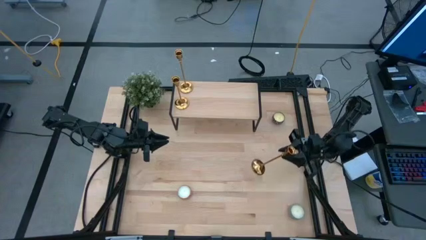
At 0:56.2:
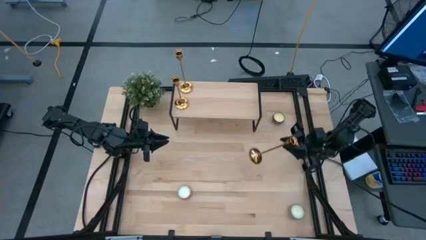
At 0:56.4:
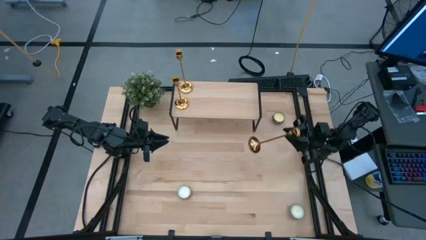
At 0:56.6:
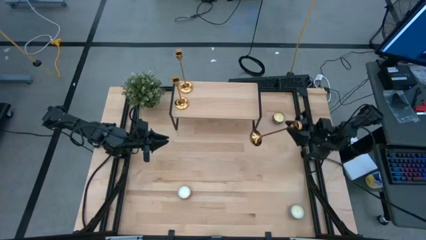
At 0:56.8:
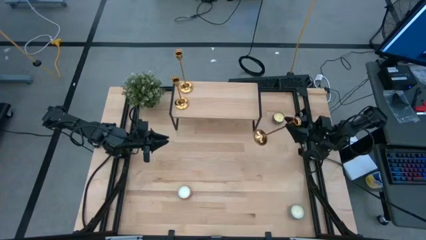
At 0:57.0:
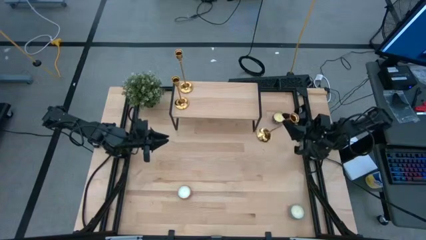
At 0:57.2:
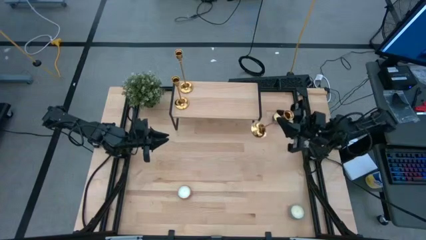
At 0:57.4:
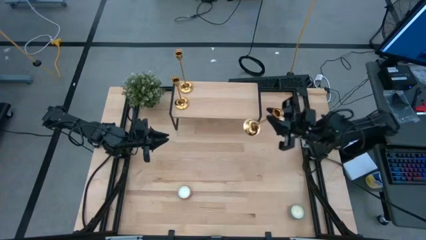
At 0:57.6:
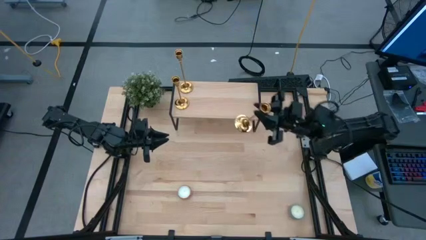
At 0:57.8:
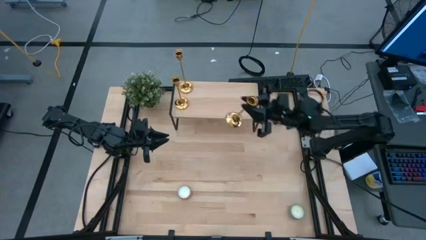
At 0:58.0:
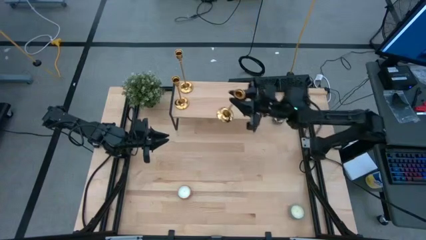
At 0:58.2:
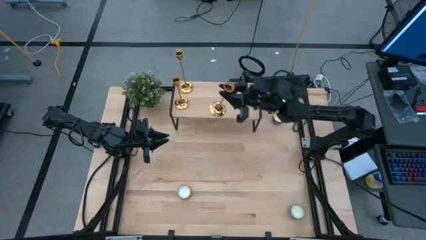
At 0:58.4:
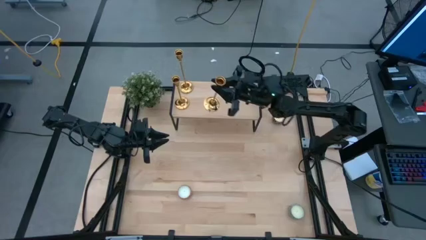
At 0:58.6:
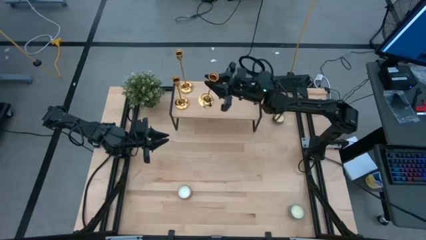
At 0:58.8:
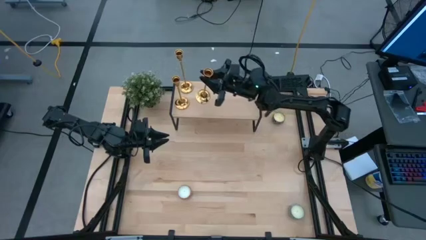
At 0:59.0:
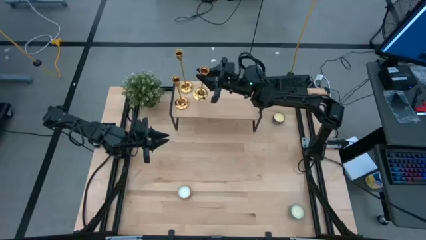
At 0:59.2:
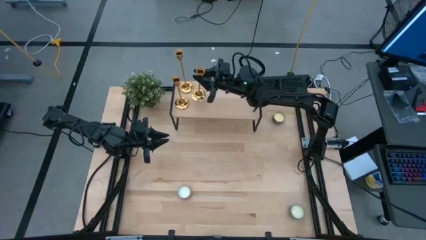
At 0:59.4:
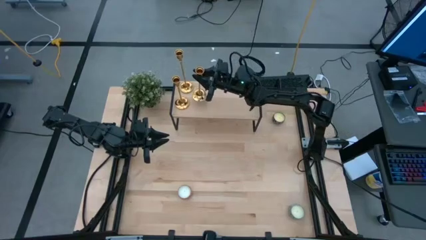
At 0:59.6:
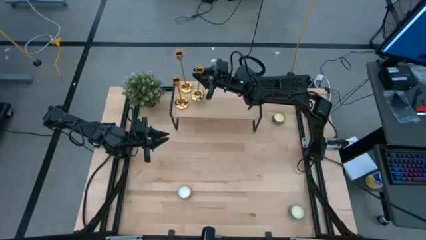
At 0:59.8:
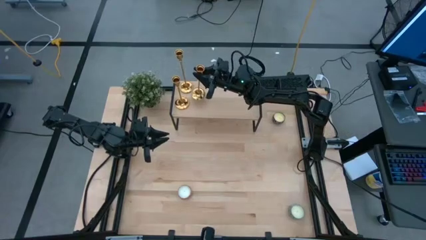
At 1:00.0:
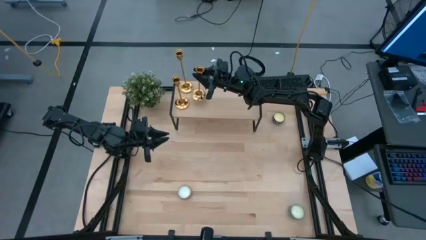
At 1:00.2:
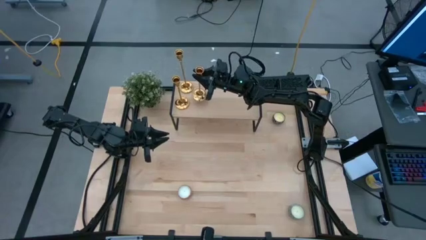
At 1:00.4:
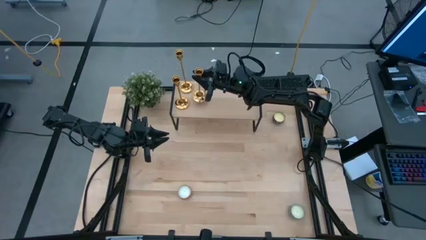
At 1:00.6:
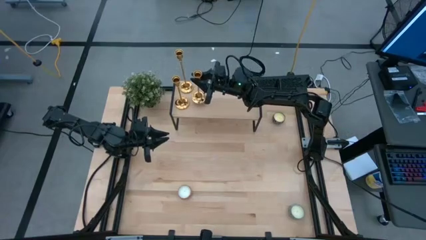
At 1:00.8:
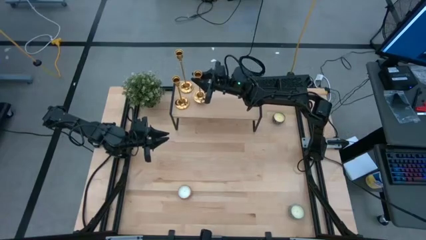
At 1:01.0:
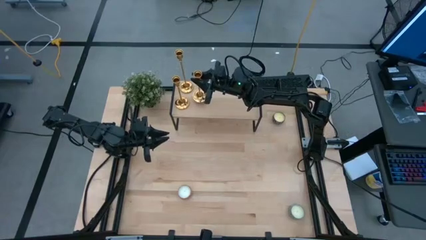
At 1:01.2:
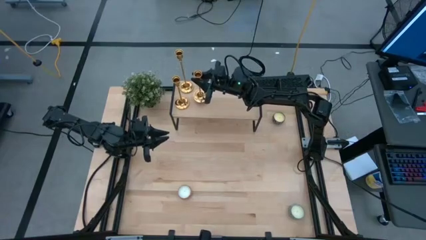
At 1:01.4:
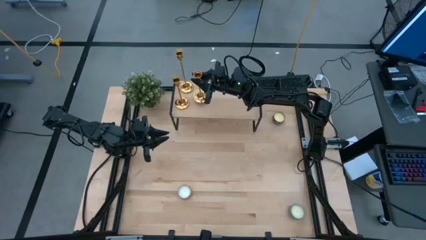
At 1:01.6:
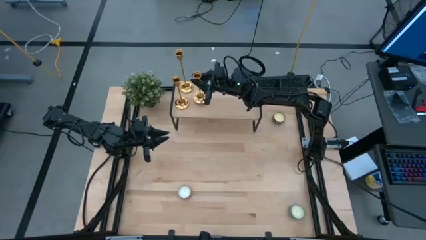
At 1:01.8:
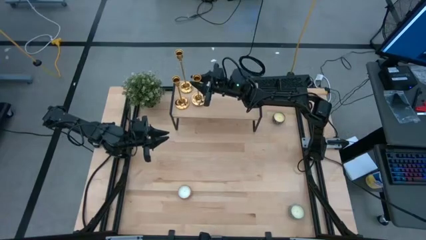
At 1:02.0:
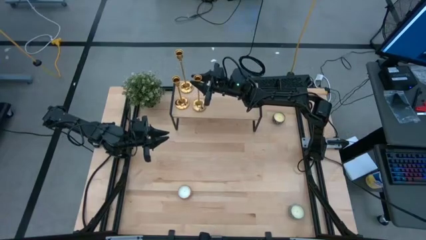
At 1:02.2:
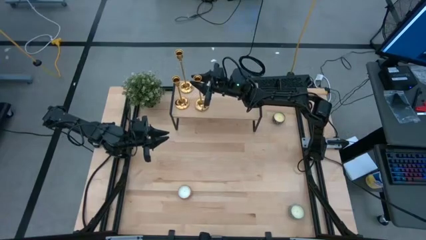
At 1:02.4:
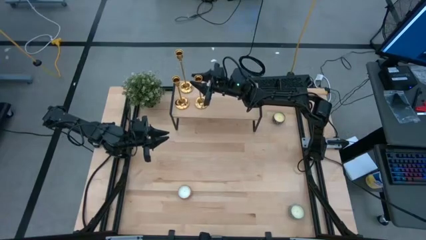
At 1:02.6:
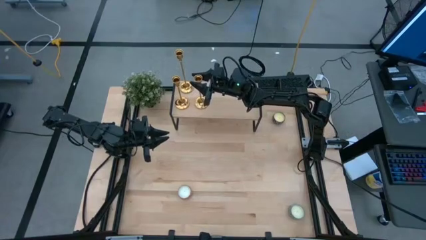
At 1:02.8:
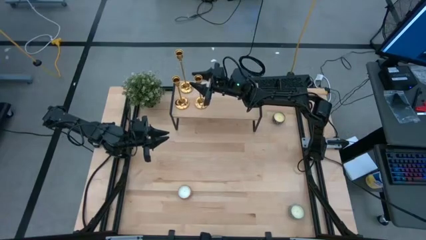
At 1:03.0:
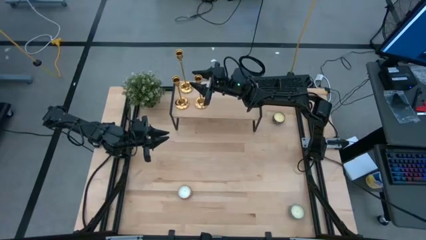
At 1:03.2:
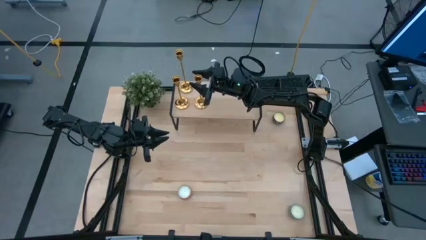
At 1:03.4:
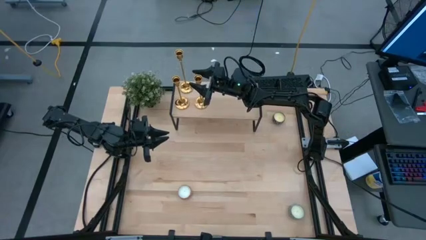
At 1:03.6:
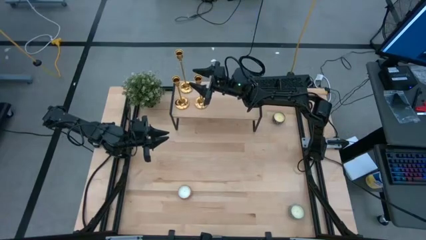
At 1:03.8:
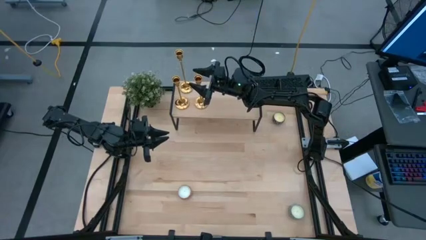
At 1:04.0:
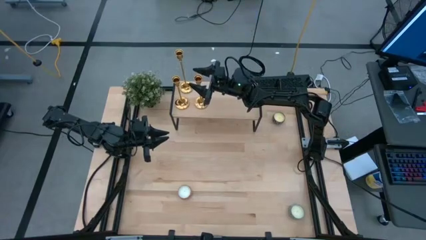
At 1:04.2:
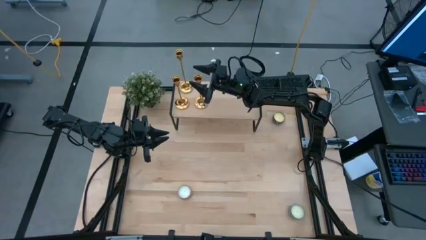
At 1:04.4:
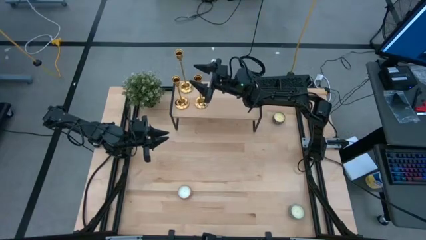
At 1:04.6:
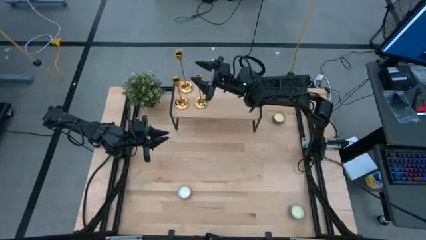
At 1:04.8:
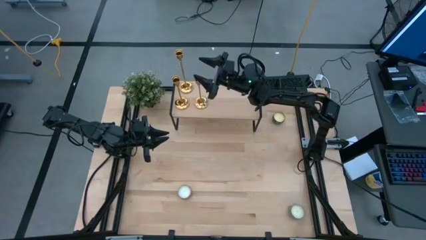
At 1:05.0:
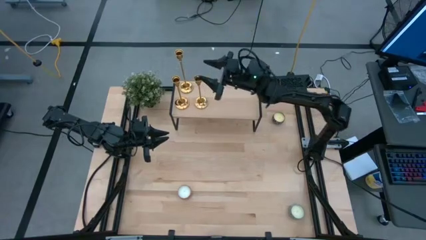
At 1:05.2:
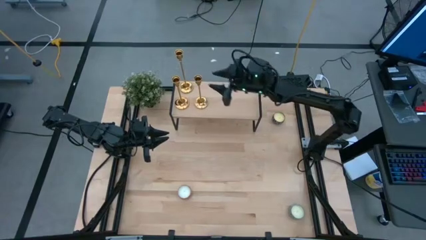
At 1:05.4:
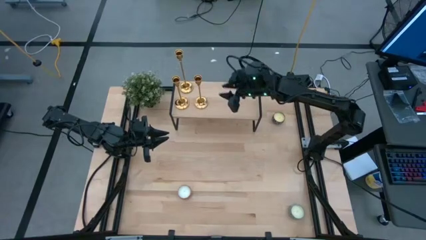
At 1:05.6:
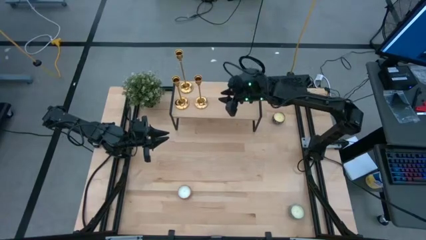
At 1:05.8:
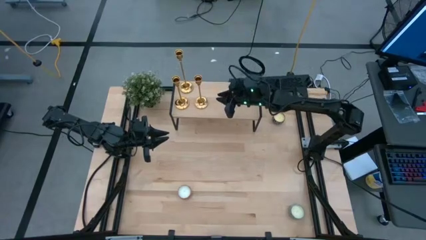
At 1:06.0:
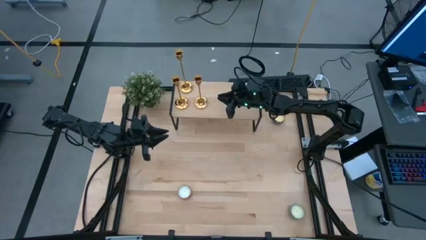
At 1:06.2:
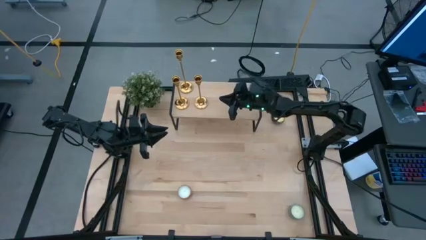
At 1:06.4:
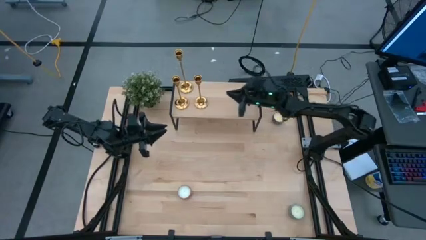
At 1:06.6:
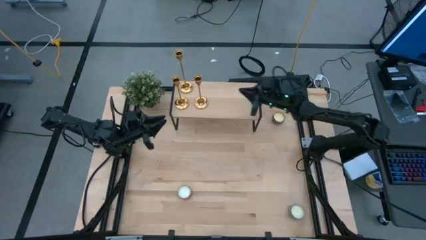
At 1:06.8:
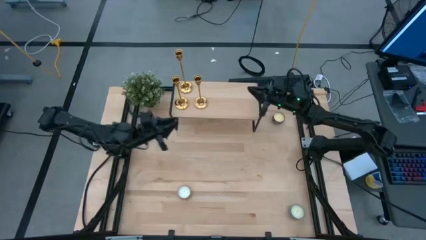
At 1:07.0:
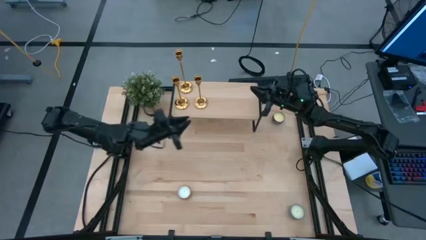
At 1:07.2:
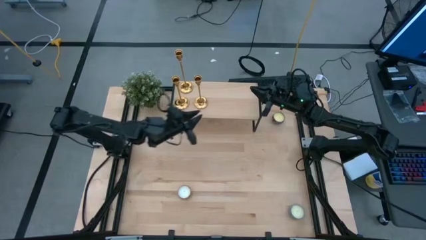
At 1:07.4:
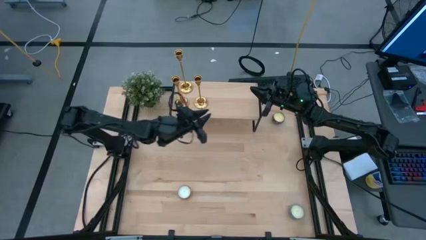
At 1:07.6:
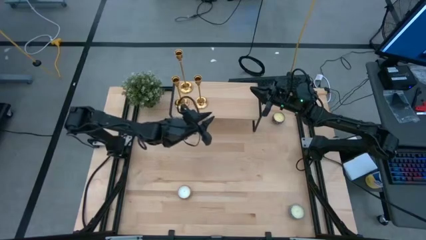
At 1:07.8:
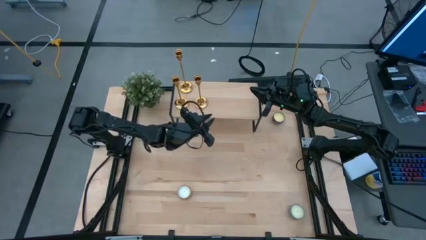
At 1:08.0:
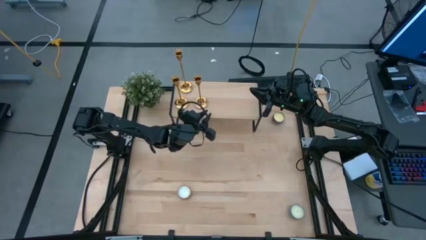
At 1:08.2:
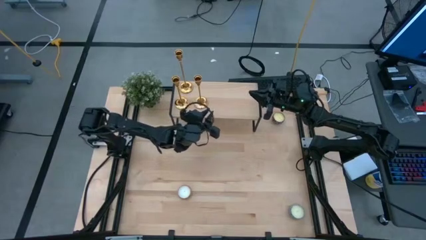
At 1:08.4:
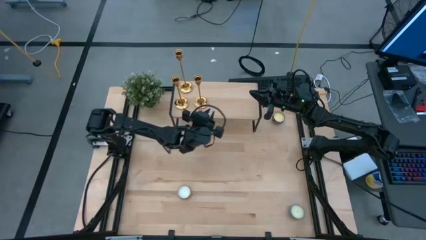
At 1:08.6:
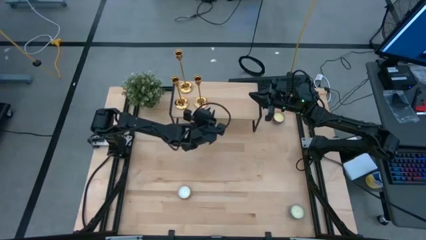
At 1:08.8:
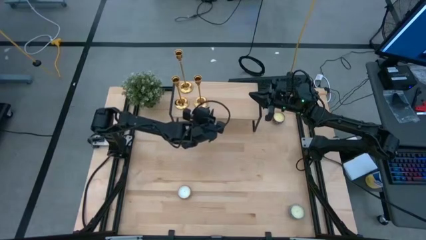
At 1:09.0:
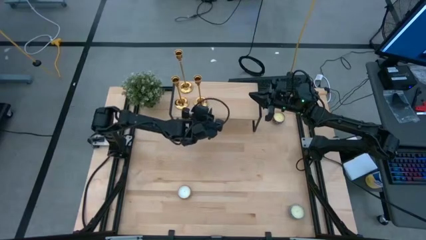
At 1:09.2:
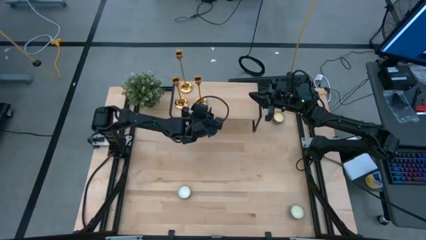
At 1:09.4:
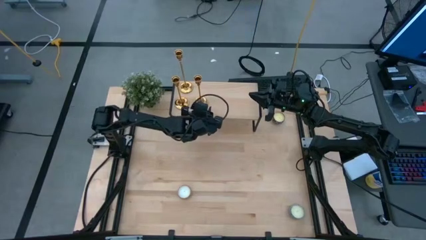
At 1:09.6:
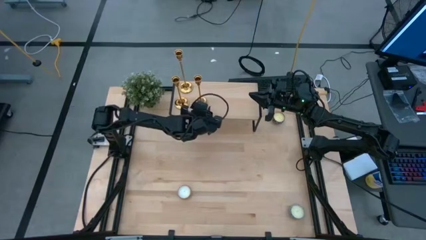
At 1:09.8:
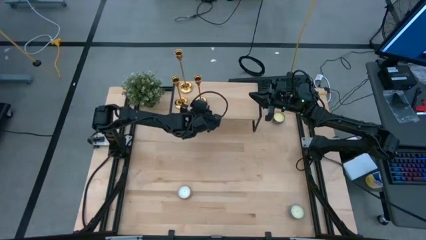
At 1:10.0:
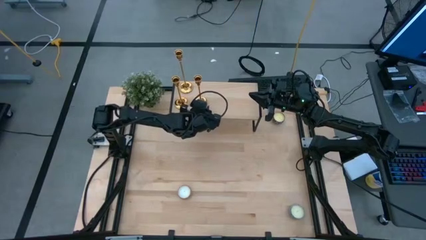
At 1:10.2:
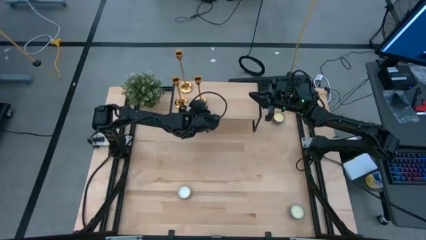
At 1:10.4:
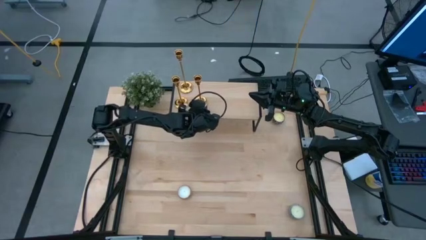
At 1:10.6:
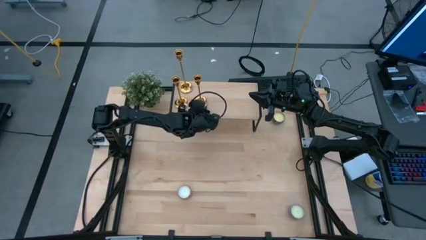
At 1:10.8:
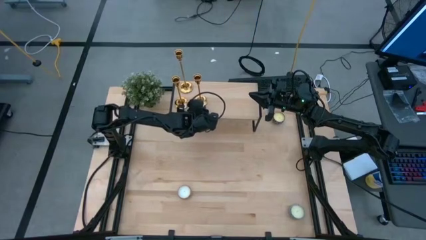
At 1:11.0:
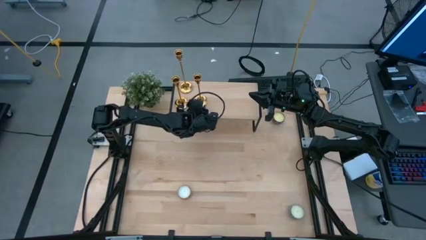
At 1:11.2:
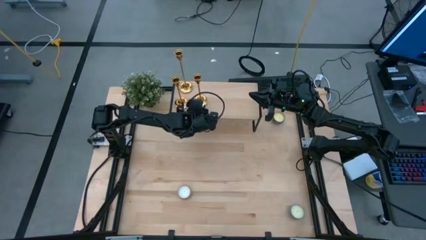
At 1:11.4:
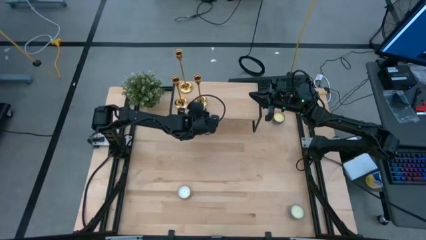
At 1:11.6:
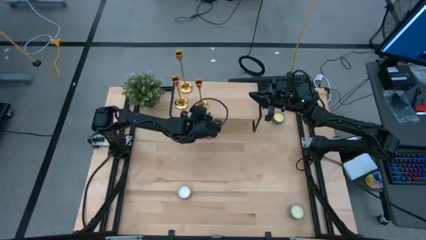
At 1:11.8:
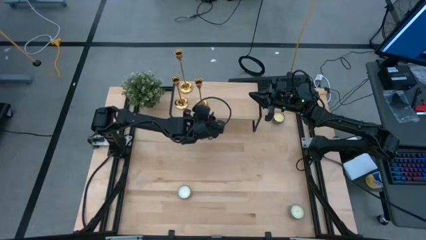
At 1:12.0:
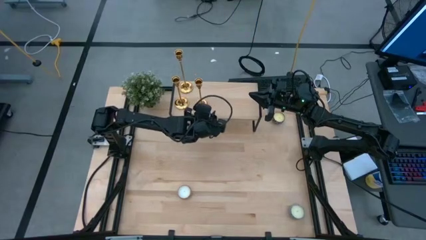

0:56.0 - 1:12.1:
Task: Pick & Place candle stick holders
Put the gold candle holder on the shelf
